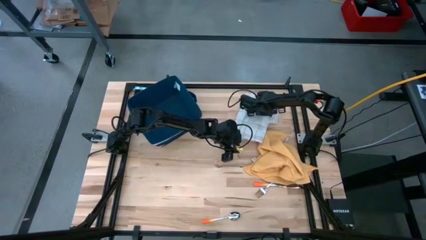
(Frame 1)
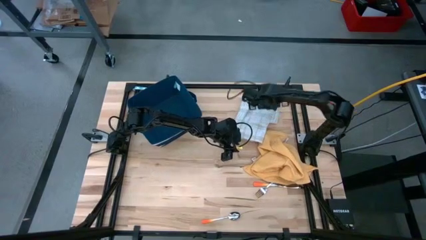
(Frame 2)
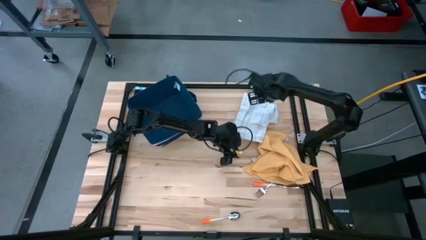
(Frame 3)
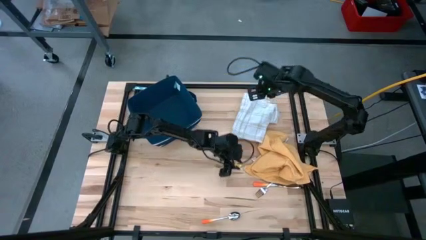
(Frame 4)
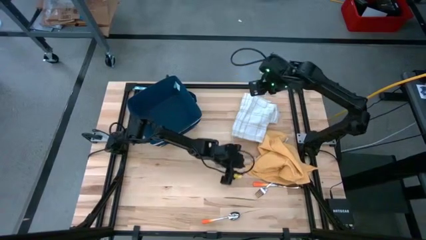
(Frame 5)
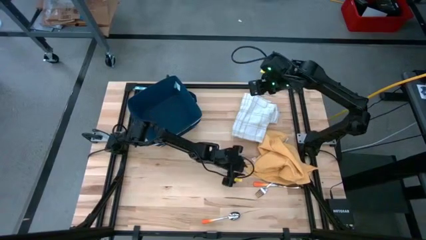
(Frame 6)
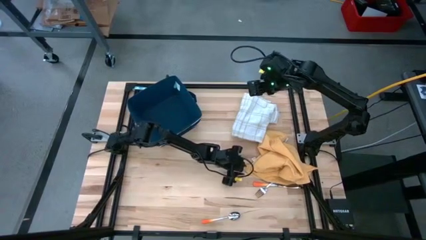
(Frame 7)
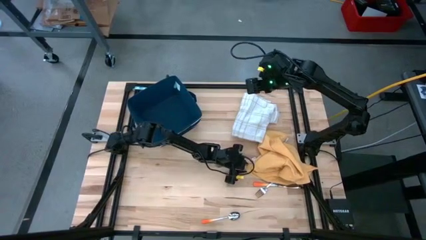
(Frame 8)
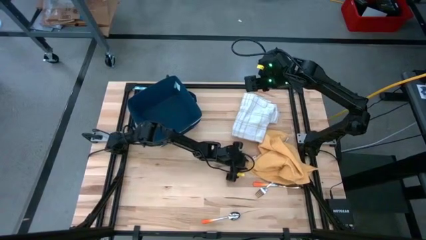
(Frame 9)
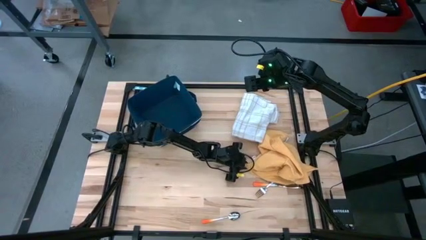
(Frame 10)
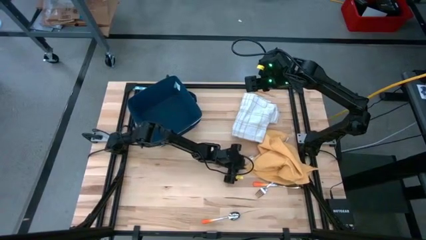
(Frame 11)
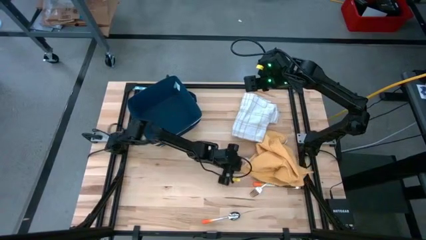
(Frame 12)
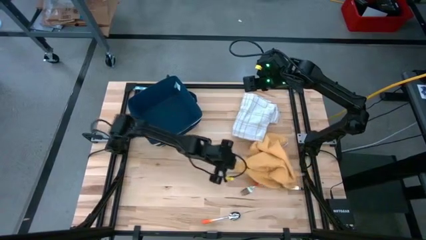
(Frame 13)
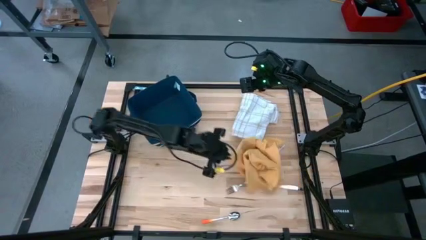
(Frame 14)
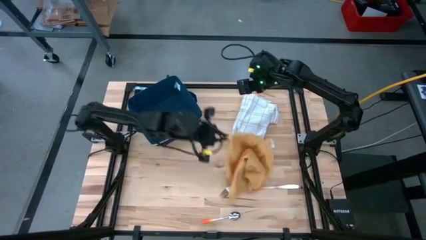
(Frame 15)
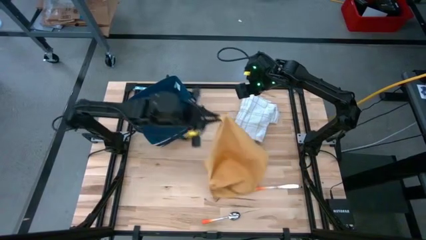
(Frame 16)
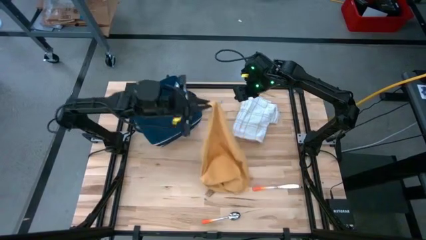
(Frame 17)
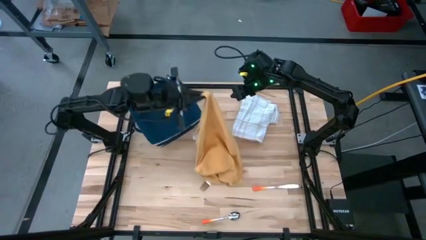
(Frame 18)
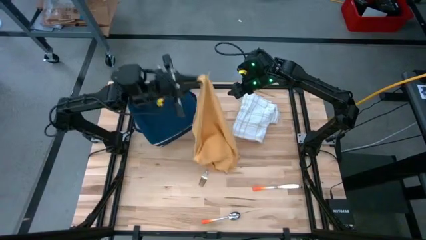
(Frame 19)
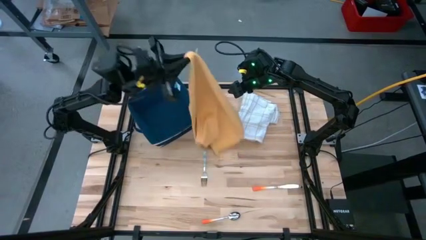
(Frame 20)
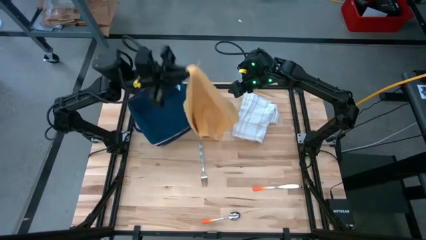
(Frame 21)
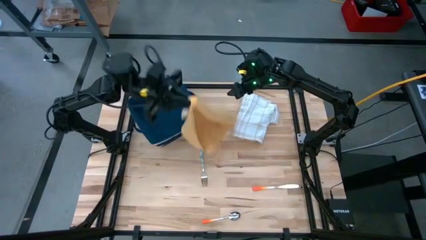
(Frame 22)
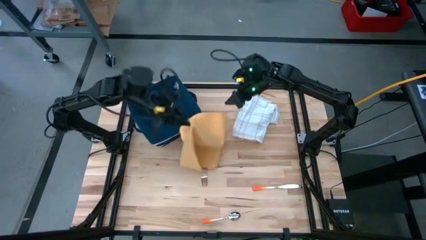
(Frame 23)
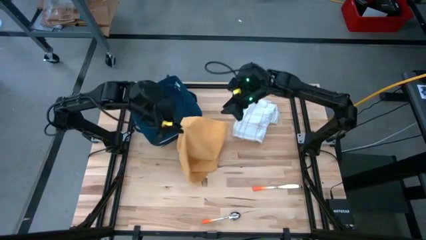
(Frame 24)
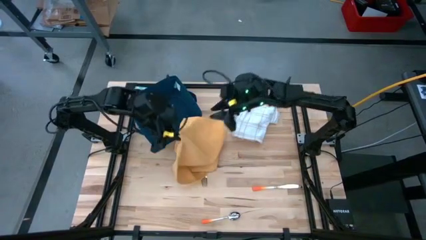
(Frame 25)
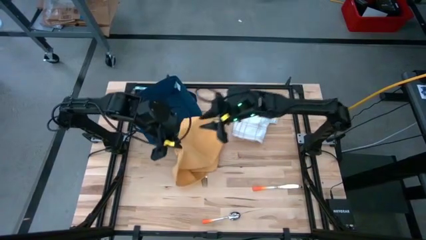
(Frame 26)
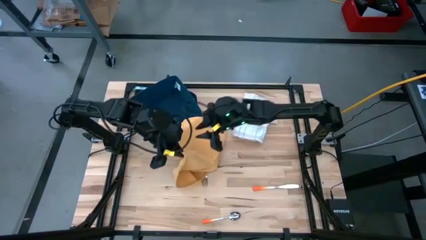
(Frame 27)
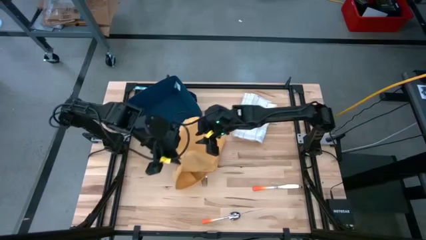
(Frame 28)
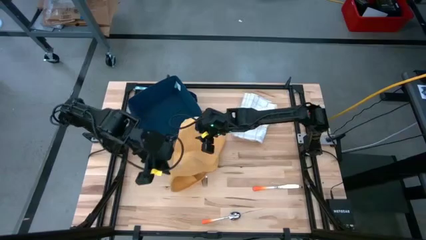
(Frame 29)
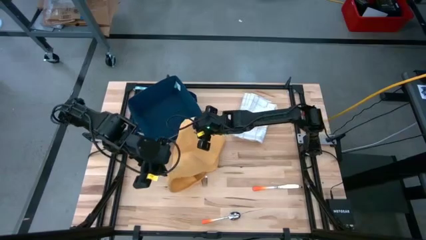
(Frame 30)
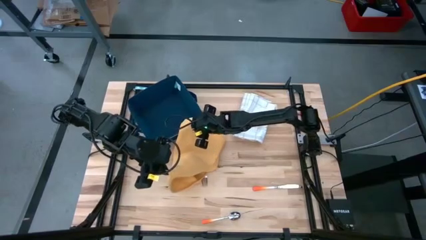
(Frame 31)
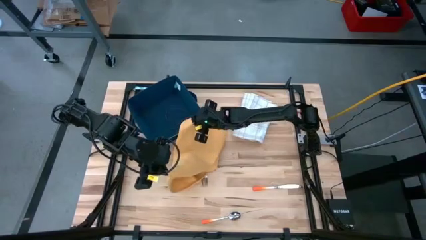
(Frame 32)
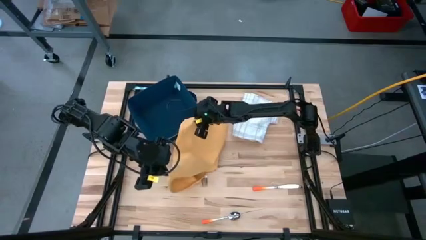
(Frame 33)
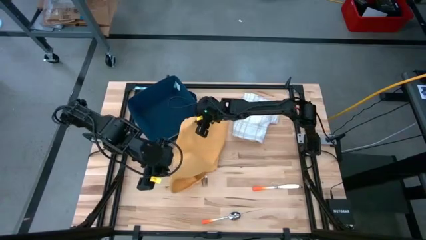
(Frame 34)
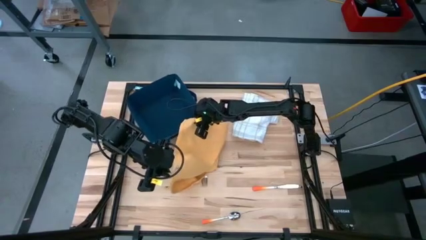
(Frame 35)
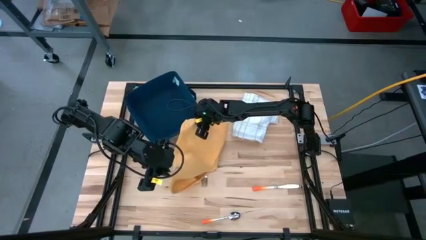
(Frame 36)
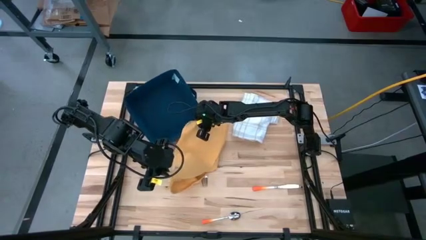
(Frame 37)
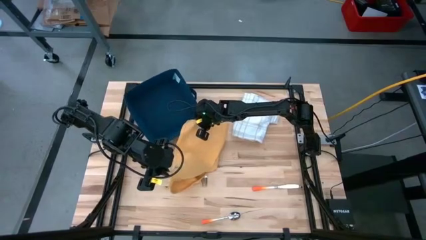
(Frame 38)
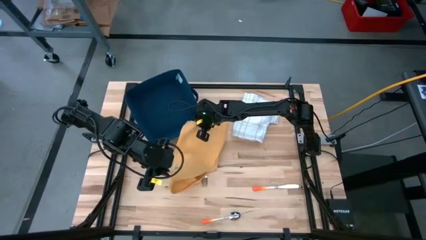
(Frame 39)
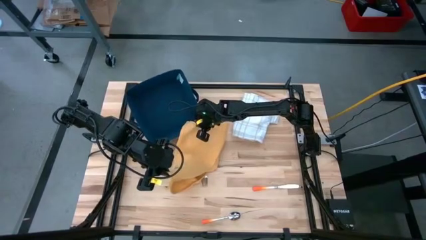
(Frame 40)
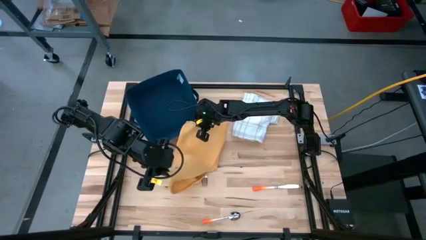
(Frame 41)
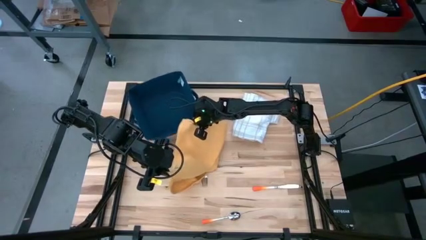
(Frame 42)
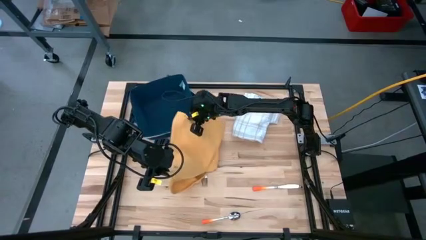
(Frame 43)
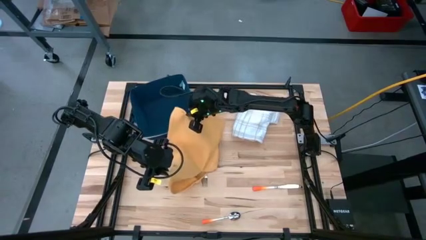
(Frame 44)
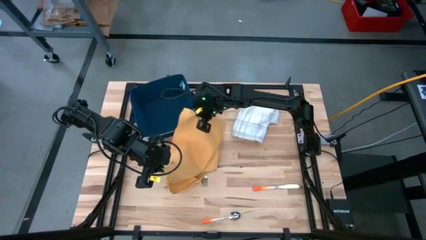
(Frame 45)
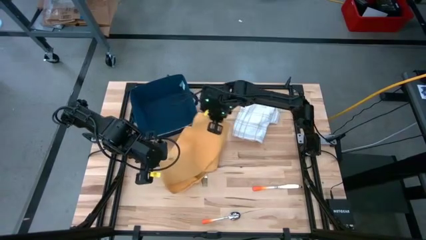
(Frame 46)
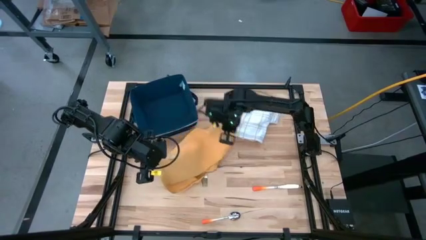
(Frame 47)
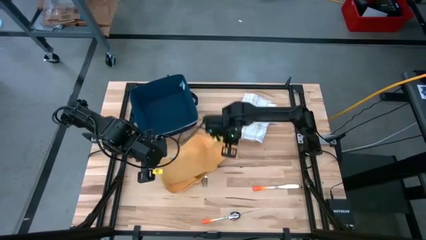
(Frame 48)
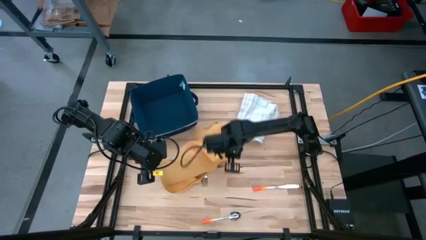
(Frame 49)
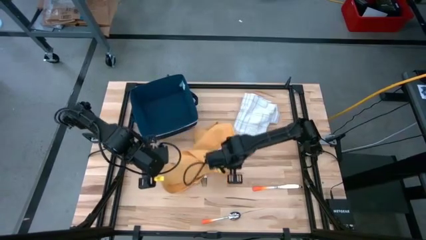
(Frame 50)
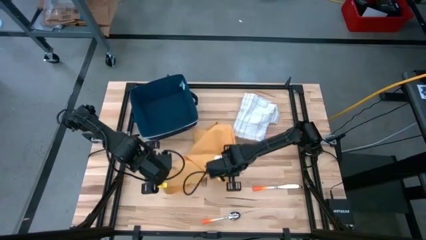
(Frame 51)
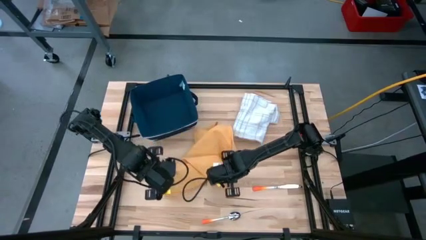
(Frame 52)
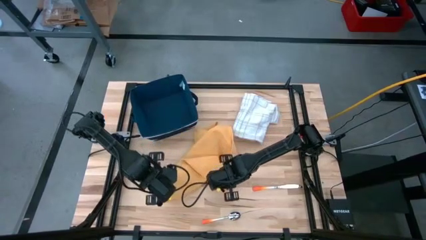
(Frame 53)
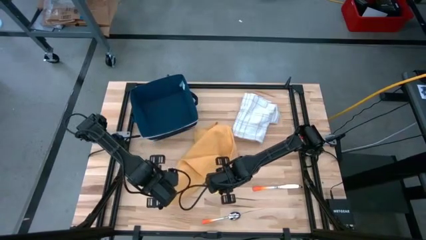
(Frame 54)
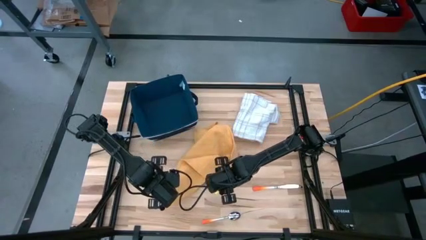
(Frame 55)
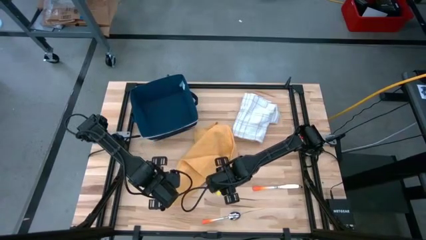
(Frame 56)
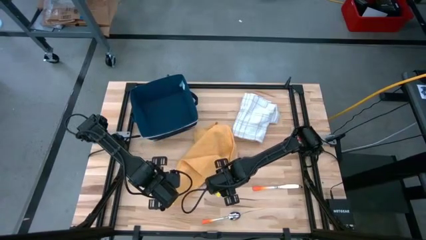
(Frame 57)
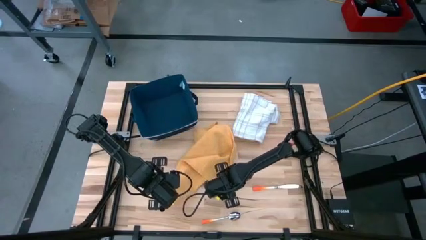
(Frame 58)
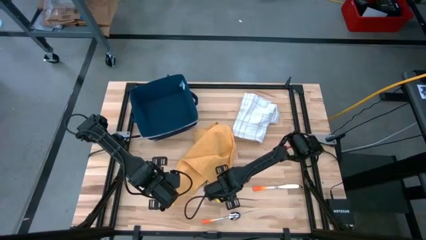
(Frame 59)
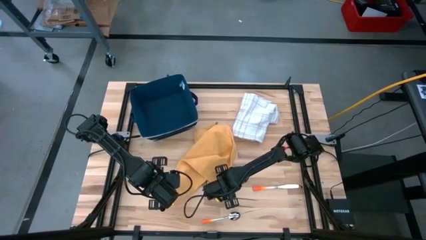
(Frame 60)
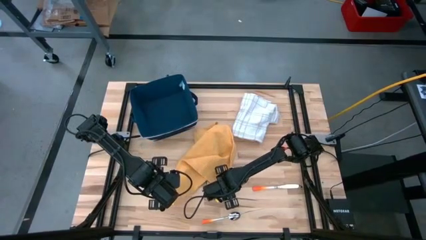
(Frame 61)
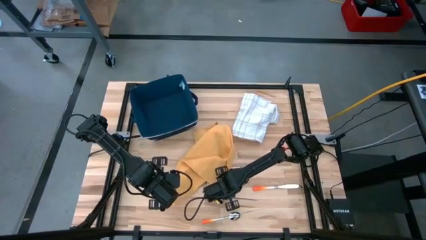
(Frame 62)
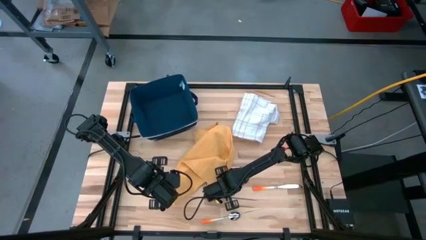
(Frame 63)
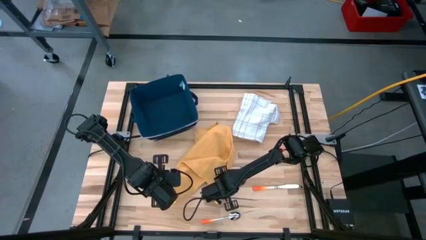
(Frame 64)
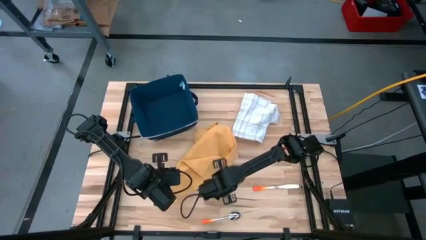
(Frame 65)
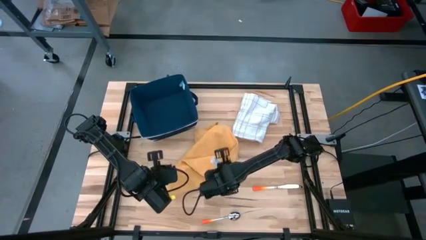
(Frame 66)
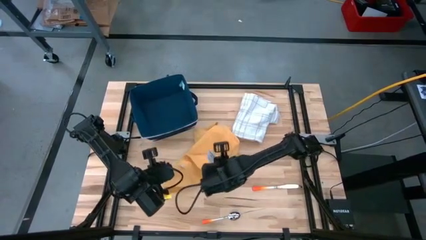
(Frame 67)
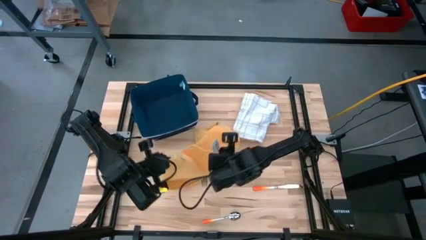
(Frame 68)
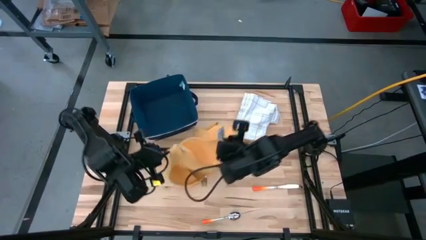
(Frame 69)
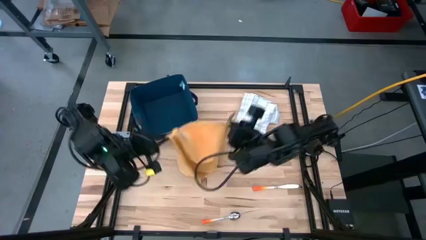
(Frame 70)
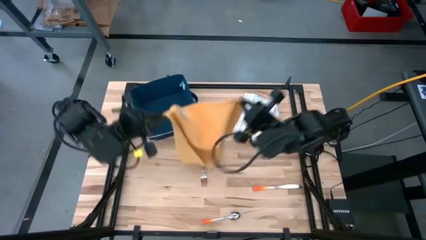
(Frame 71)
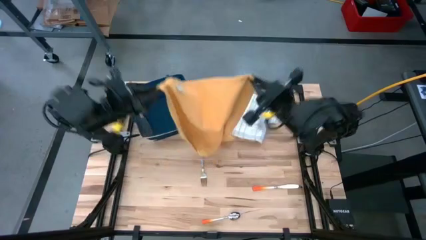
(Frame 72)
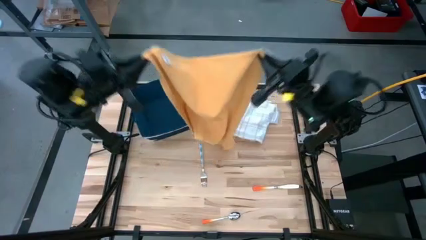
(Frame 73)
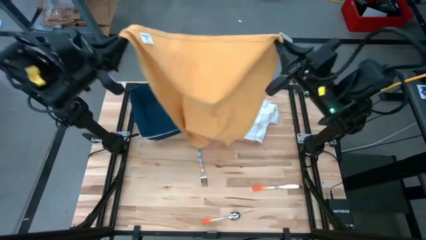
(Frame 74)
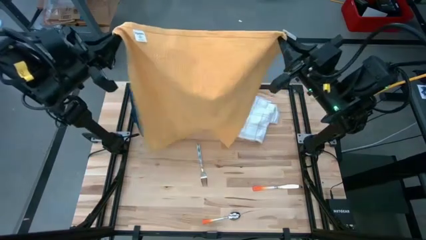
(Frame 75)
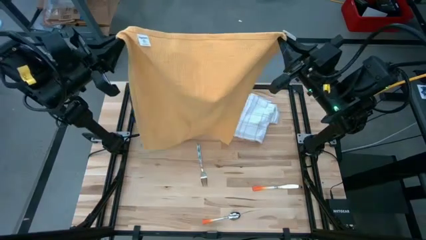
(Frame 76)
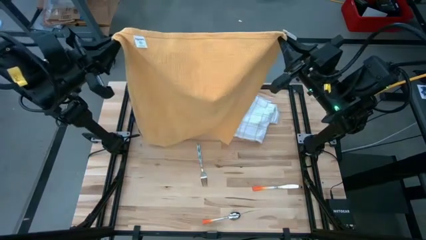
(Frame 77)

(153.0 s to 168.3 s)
Task: Fold towel
Fold the yellow towel
